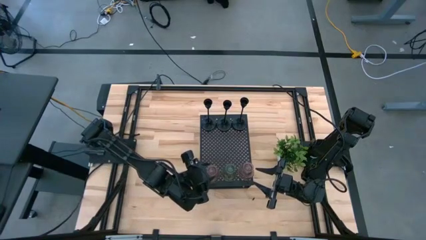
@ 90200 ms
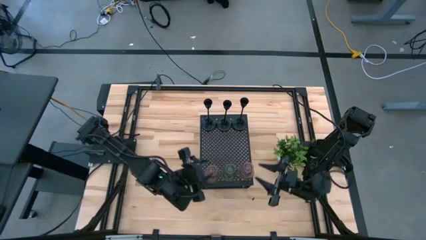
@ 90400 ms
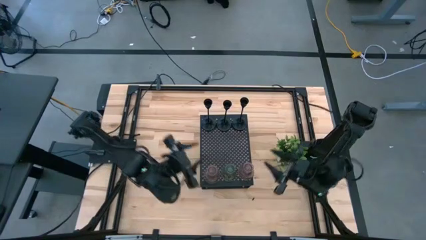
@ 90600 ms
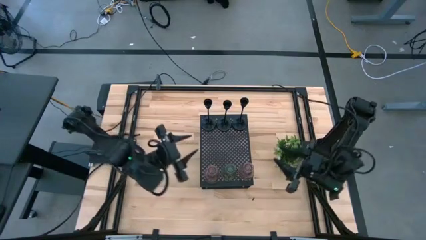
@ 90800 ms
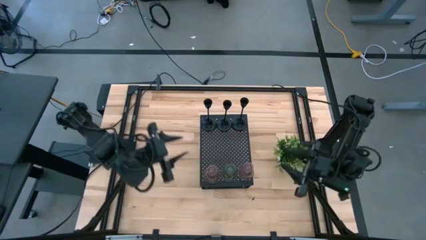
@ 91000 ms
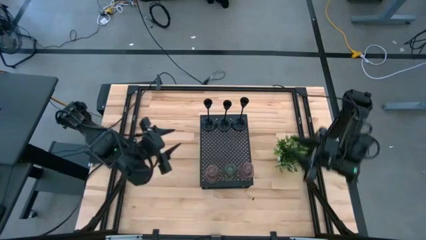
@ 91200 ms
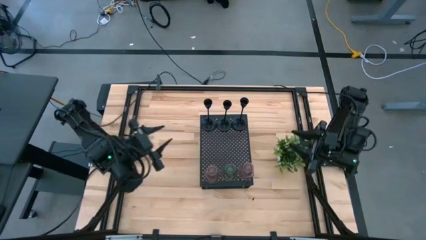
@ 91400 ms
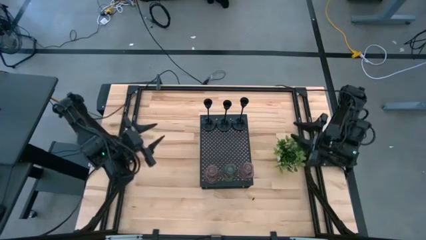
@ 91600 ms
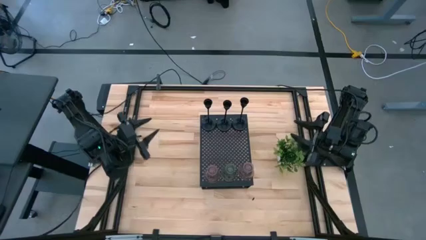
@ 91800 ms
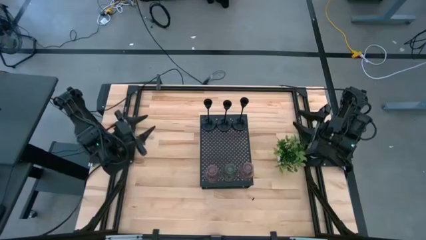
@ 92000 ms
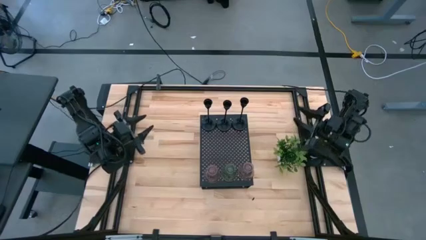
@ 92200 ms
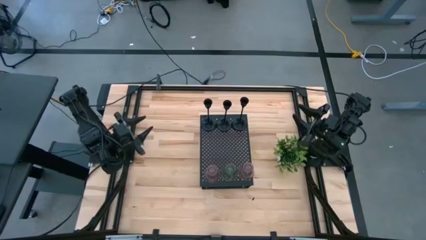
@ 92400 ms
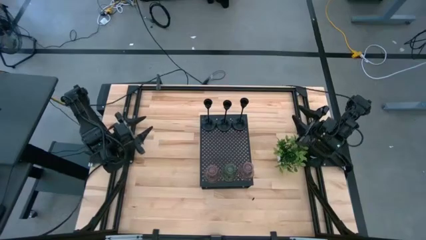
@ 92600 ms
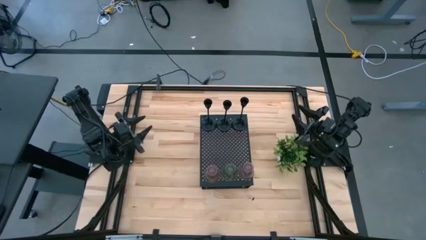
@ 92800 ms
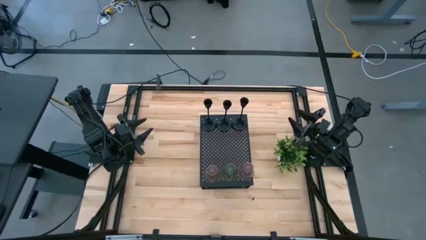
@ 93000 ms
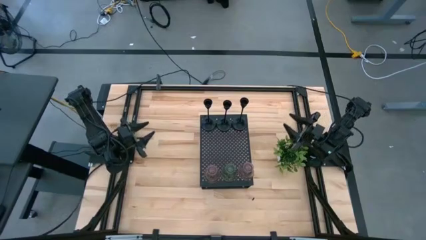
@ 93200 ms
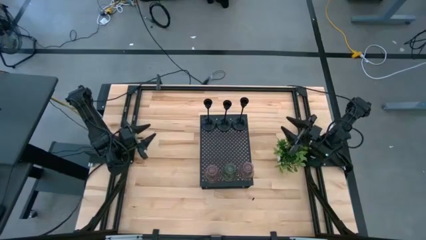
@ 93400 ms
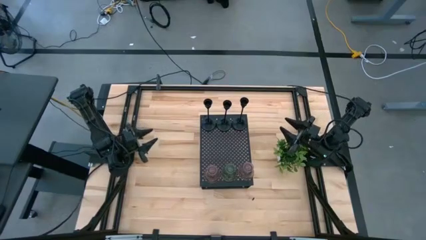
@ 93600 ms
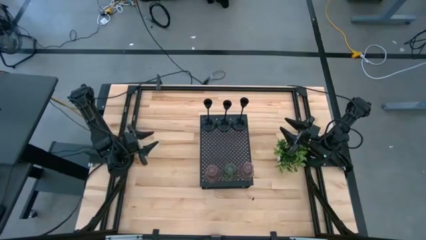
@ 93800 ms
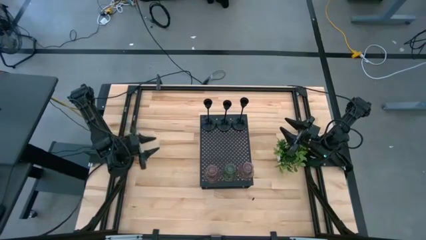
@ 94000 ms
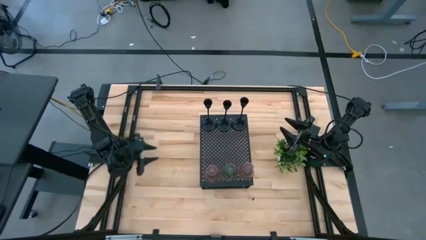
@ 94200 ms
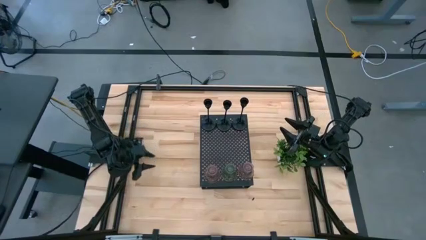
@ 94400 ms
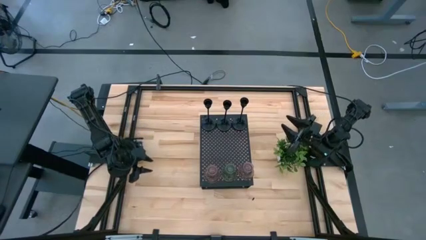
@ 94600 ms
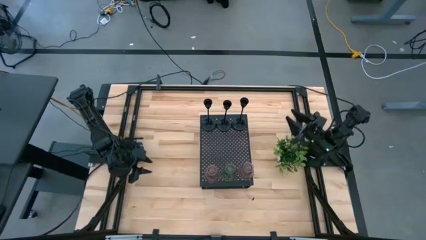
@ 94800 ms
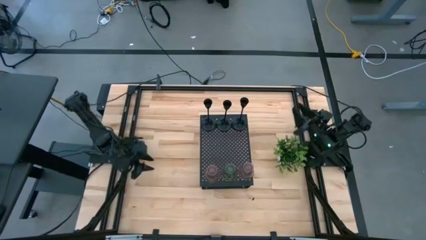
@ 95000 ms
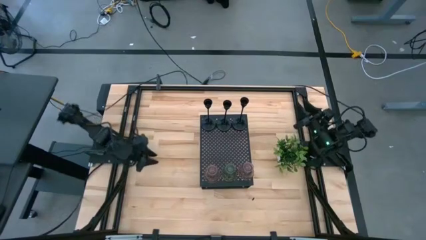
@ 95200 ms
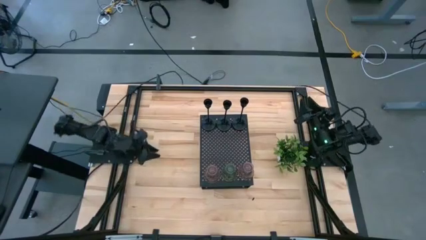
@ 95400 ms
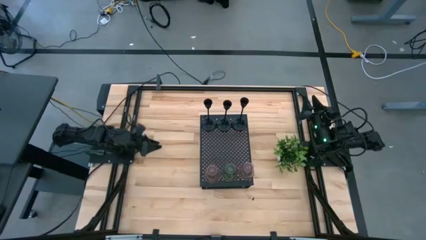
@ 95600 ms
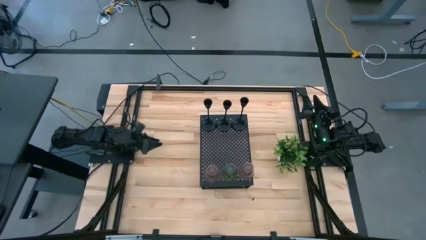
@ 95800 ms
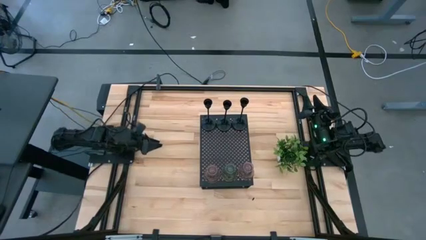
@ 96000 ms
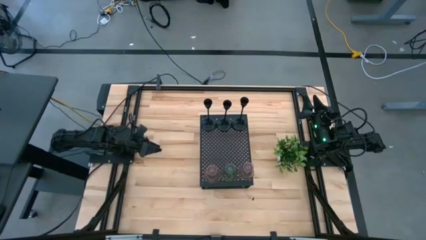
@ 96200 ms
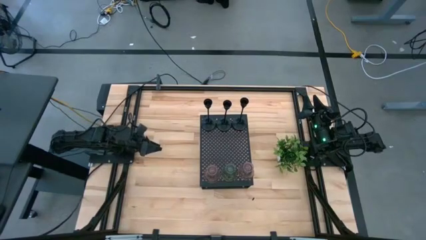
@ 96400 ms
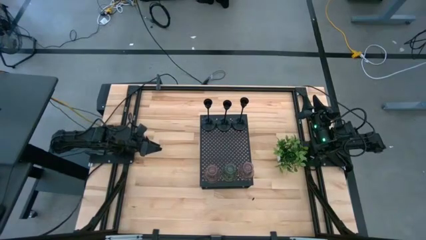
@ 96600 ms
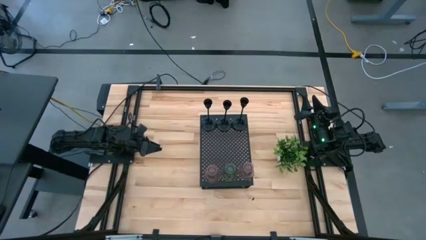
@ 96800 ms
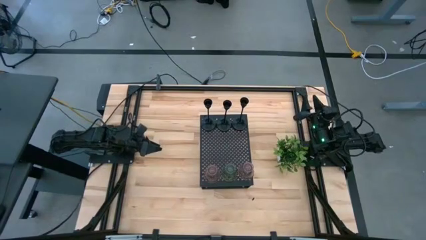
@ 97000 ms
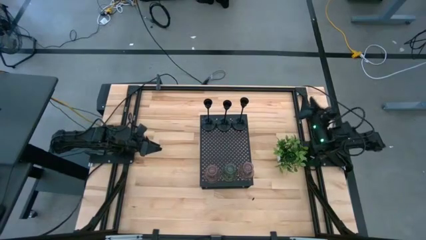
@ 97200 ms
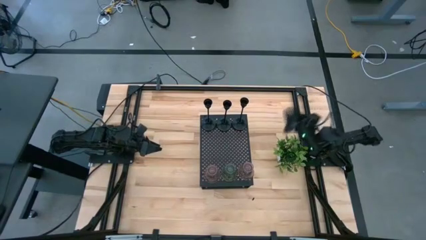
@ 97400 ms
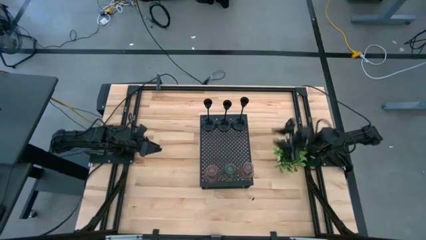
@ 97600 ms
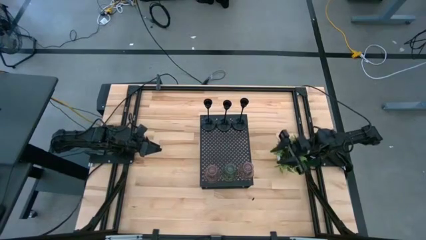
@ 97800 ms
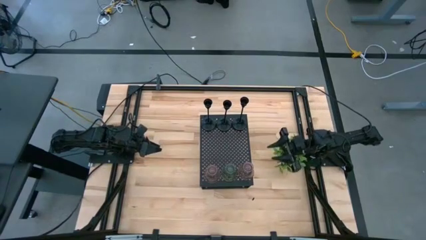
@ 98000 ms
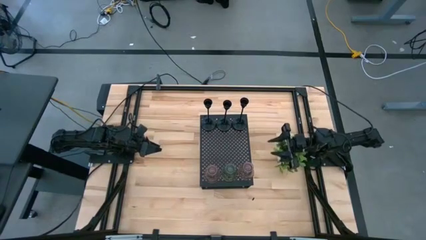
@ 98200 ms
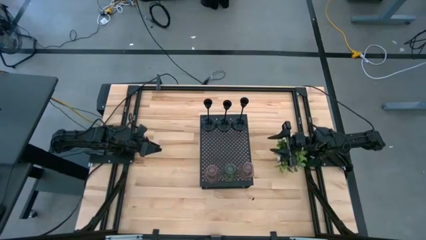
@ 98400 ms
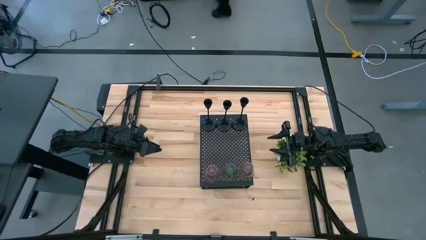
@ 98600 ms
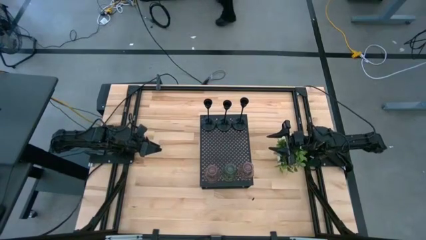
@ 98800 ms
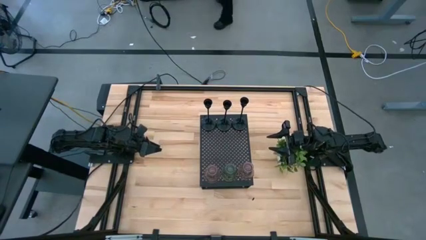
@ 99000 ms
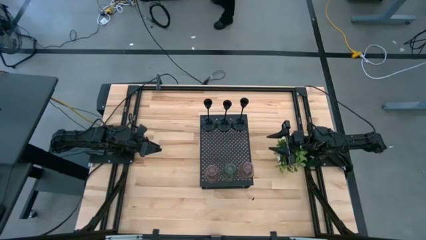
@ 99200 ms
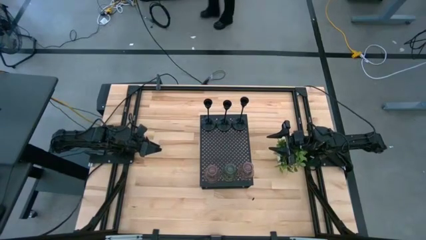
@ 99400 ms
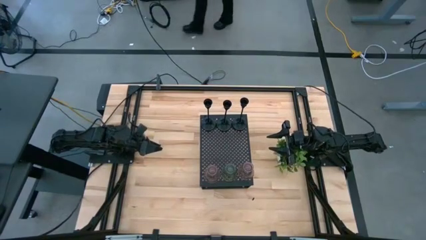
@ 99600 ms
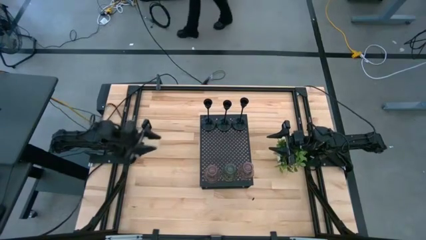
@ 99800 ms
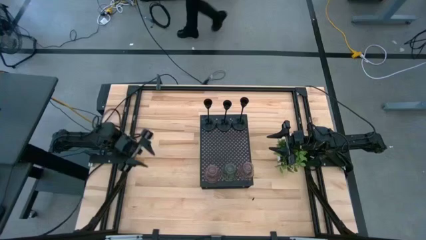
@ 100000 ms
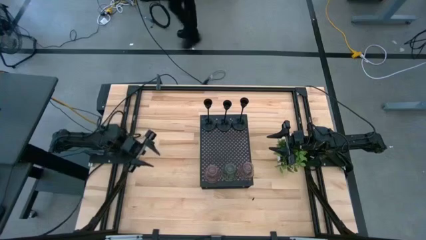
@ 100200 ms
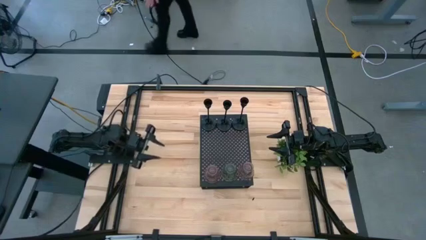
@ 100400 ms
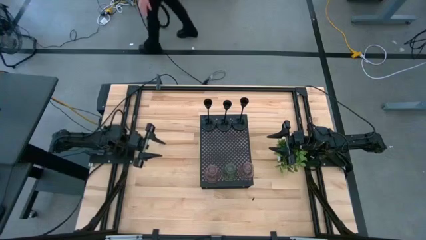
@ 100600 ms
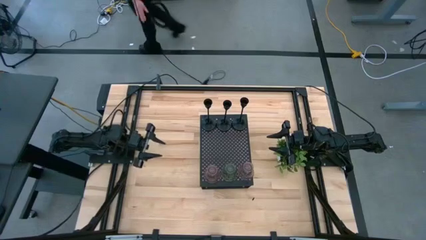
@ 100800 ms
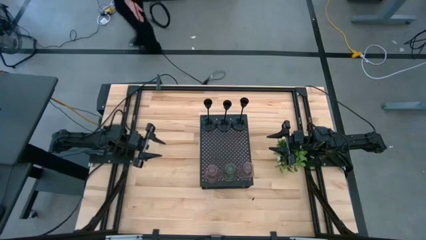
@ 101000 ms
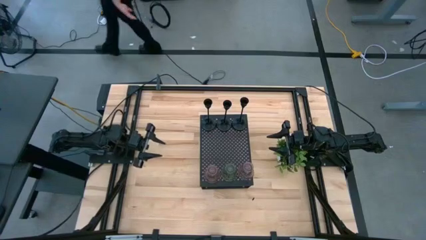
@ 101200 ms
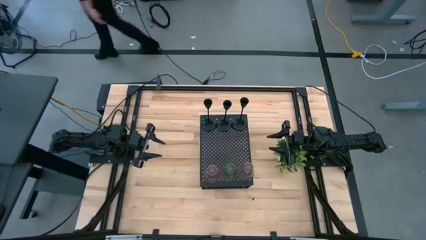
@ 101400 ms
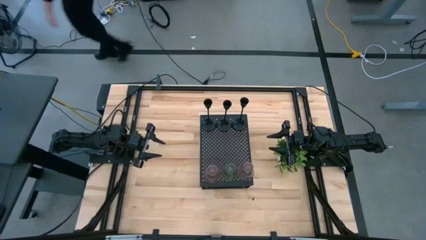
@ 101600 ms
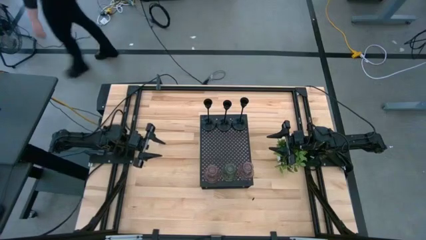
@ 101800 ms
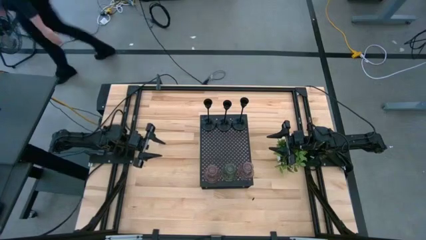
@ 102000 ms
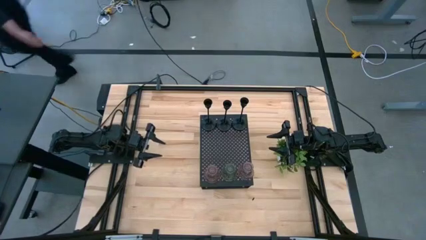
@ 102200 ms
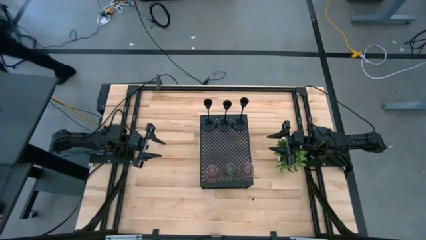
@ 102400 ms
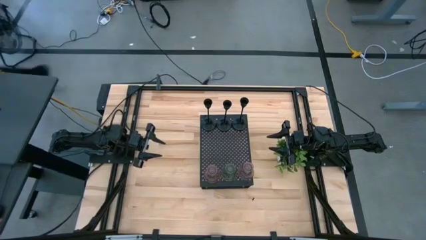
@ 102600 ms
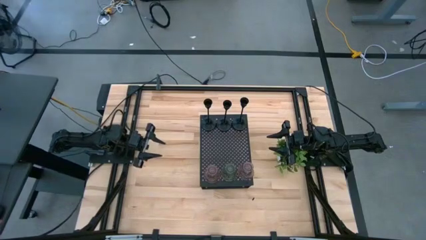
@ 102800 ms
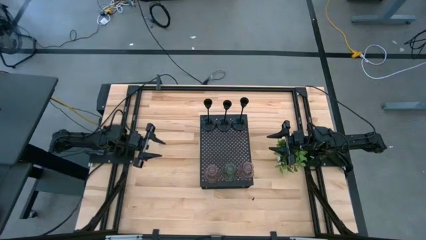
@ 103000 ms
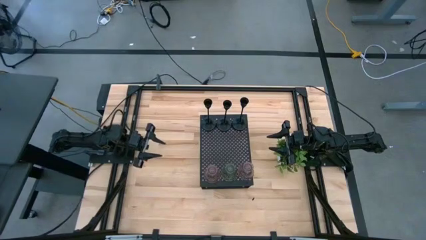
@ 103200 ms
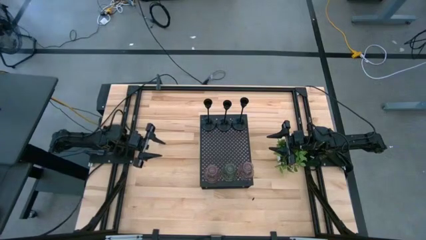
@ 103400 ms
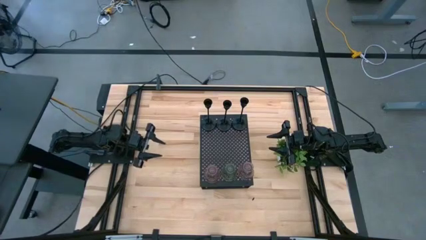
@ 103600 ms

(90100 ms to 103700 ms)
Task: Pick & Place candle stick holders
Return to Home Position

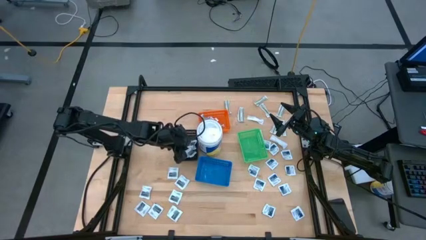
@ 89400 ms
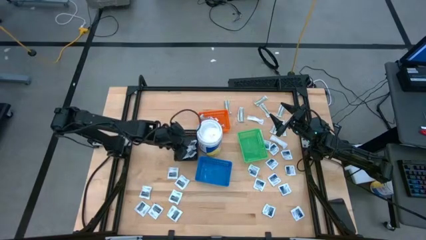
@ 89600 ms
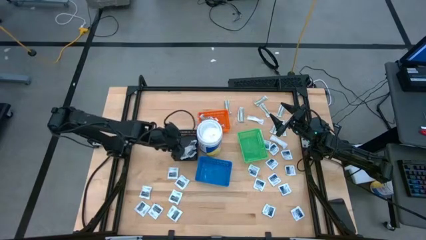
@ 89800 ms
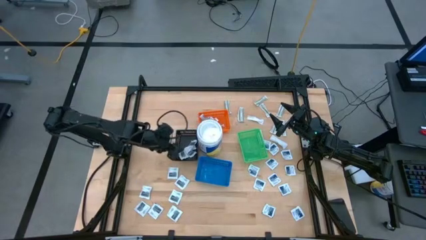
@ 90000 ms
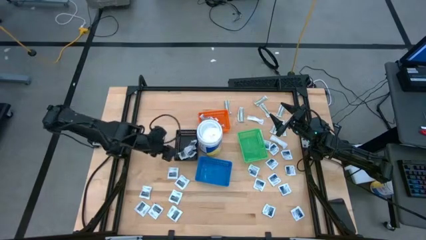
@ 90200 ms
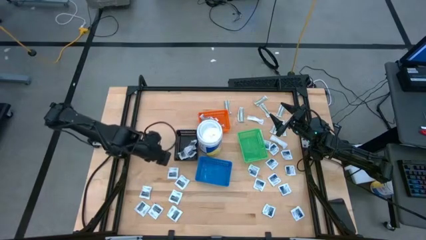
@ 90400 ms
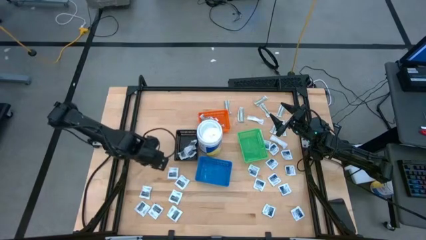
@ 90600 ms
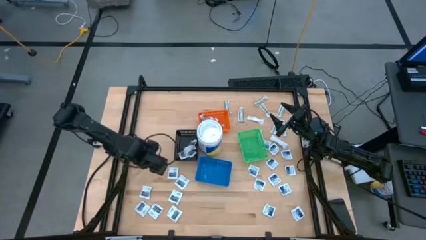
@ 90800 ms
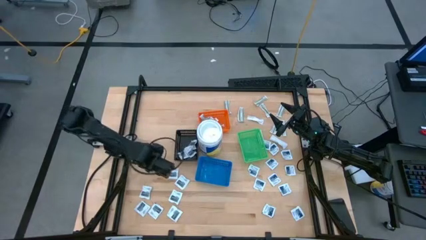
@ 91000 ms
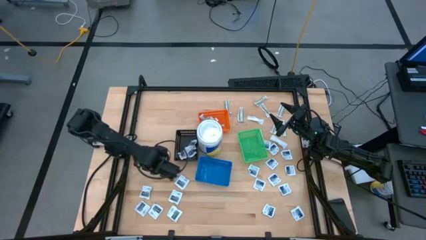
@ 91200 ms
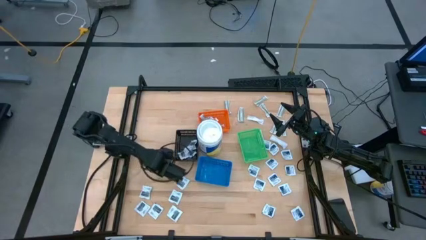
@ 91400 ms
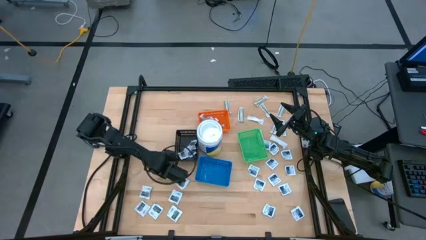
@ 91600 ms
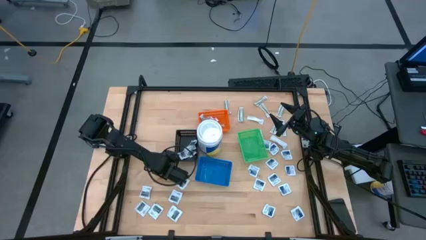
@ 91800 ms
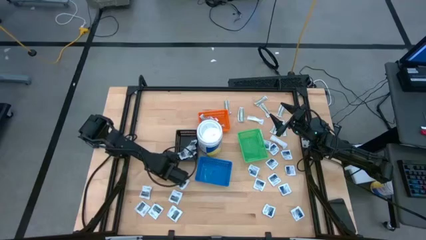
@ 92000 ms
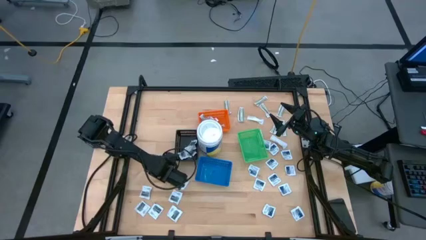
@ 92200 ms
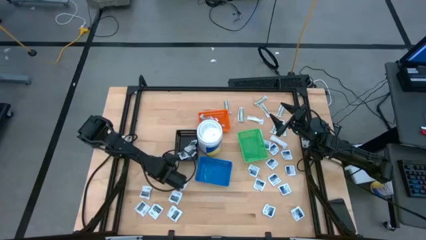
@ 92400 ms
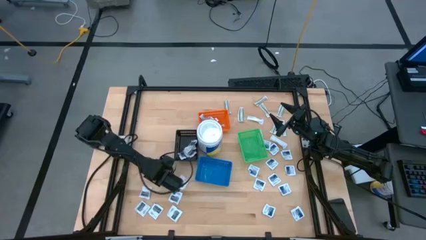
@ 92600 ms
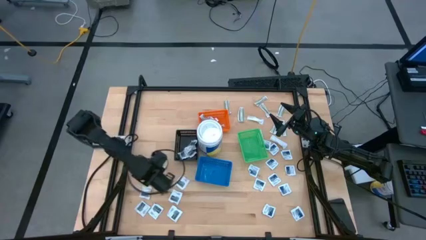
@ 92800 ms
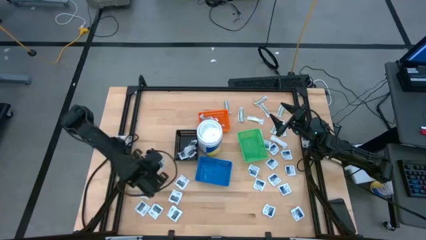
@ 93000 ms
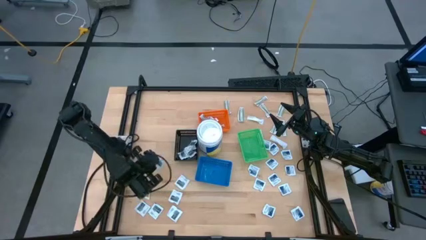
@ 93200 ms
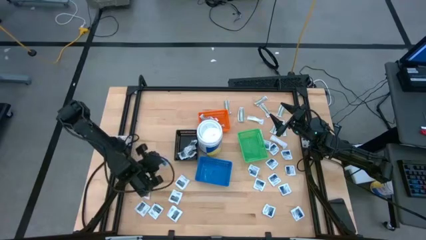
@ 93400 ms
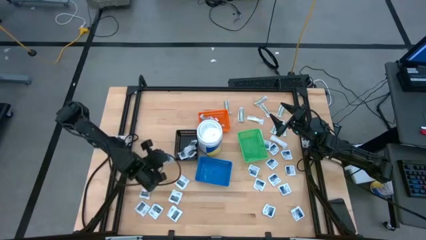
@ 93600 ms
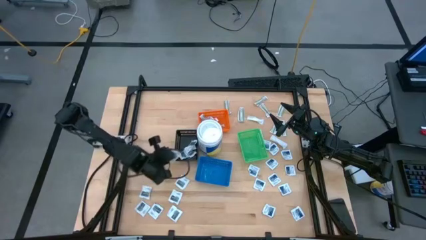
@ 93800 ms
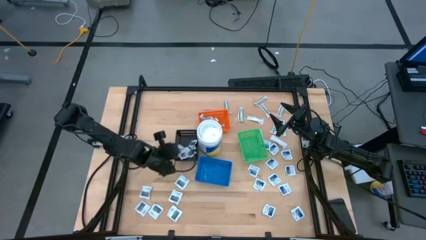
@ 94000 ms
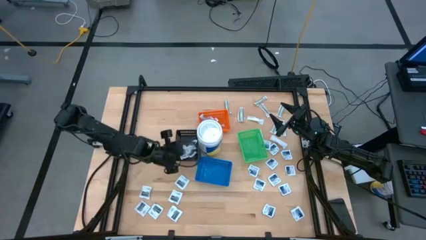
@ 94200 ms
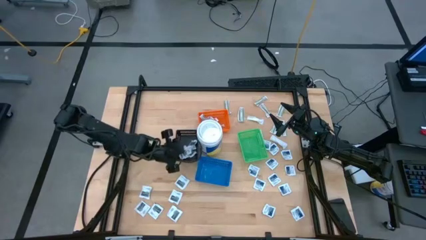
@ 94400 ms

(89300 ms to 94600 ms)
Task: Pick & Place First Aid Supplies
Put the gray towelette pack into the black bin
